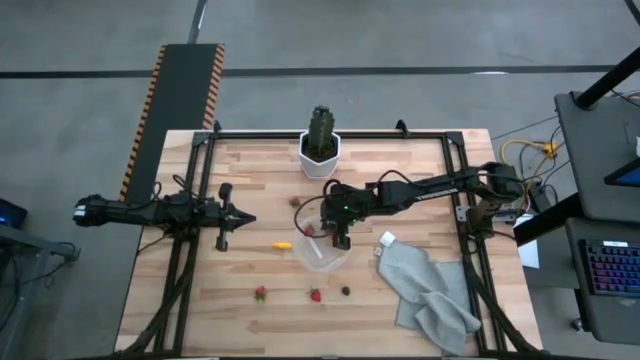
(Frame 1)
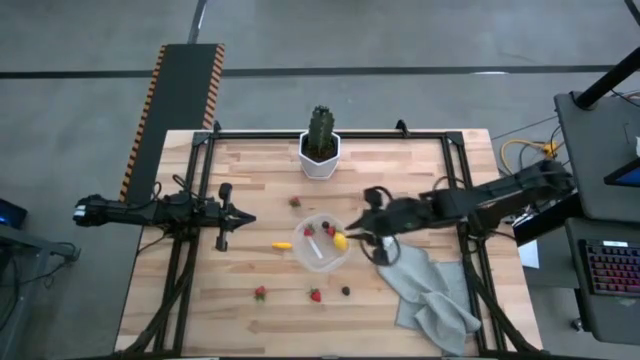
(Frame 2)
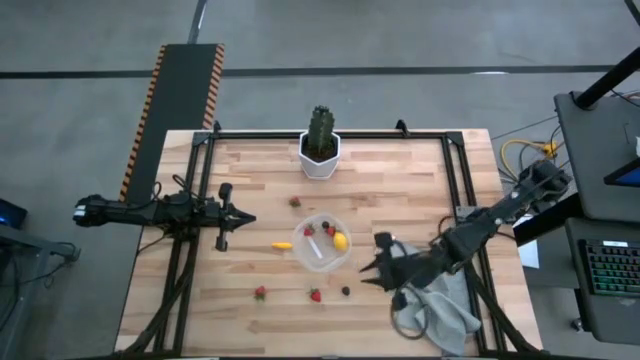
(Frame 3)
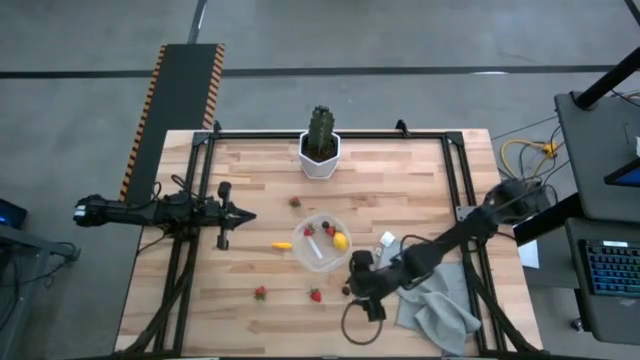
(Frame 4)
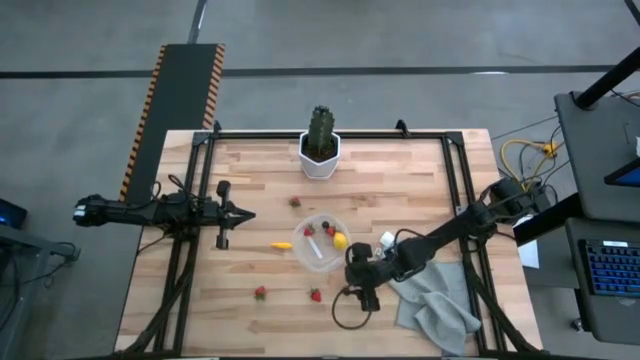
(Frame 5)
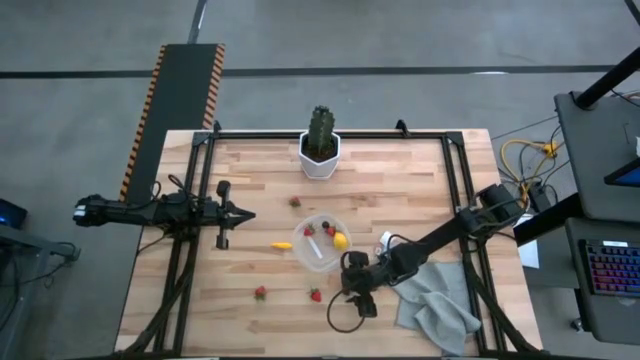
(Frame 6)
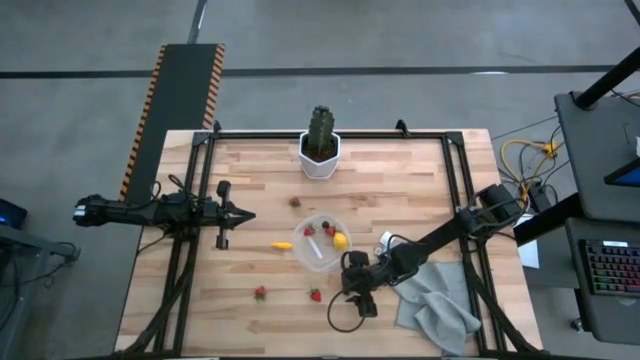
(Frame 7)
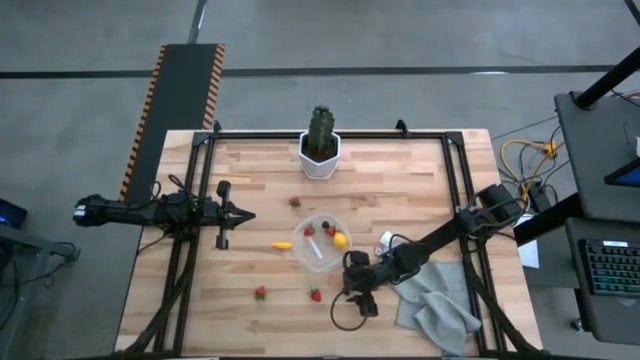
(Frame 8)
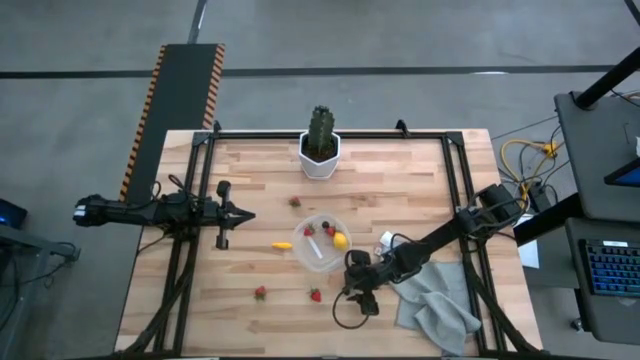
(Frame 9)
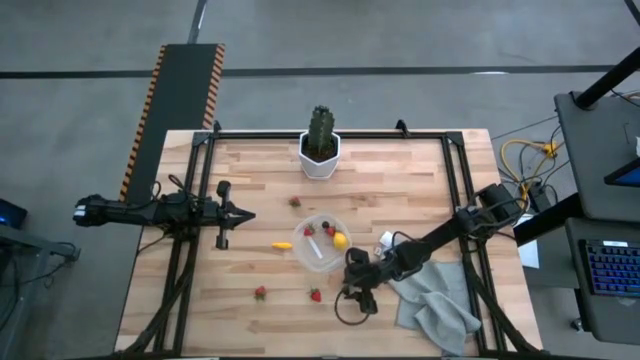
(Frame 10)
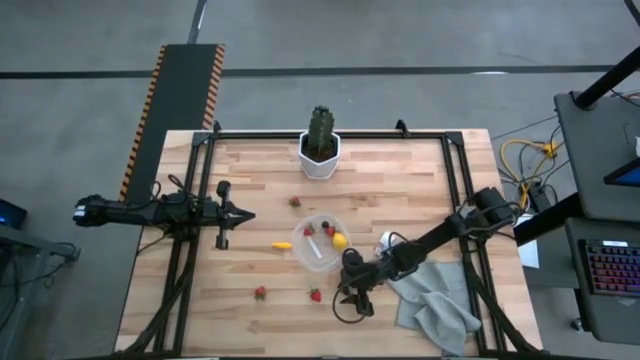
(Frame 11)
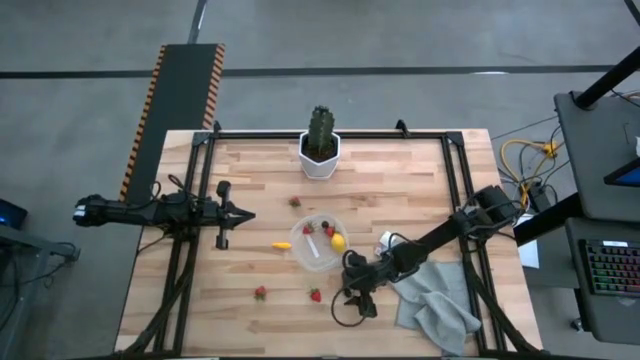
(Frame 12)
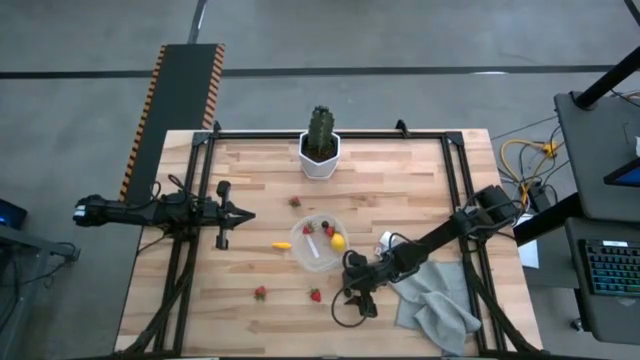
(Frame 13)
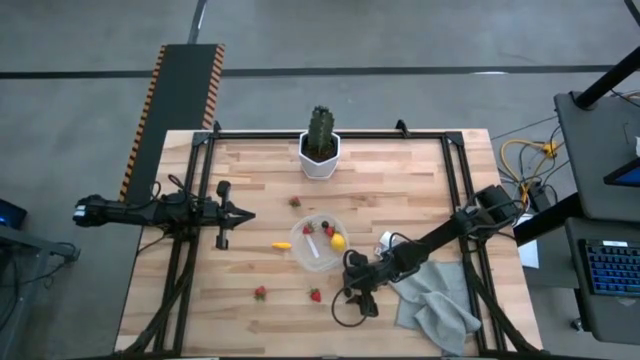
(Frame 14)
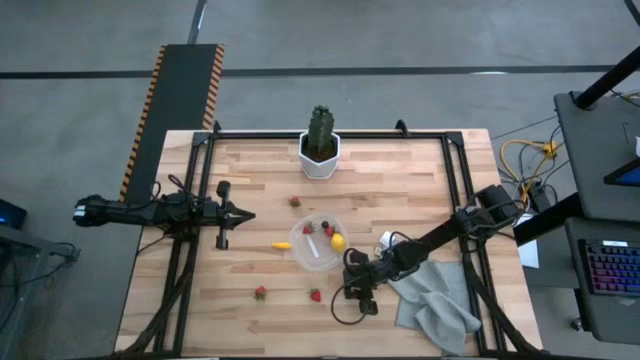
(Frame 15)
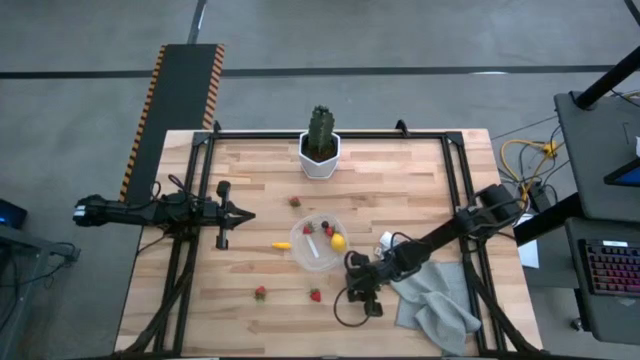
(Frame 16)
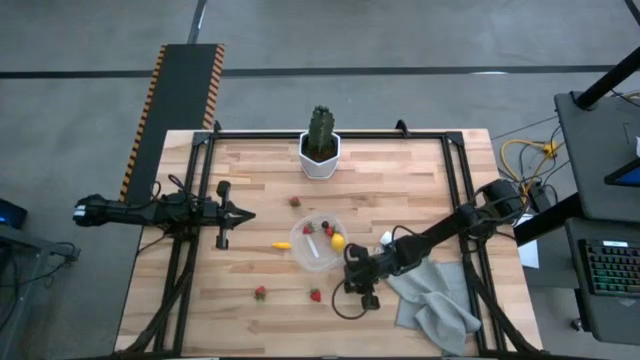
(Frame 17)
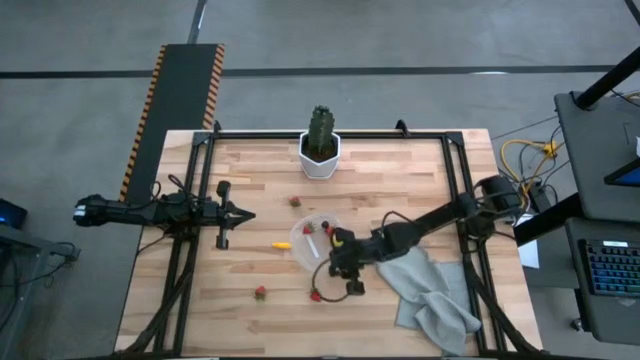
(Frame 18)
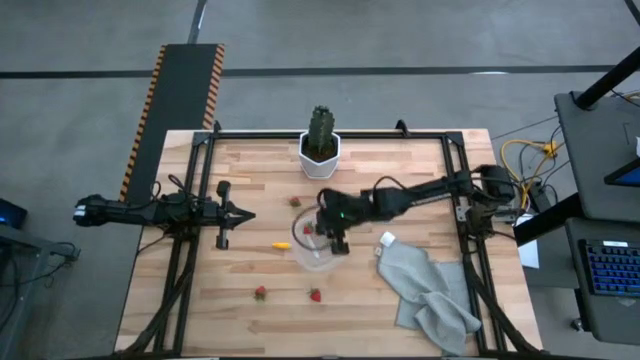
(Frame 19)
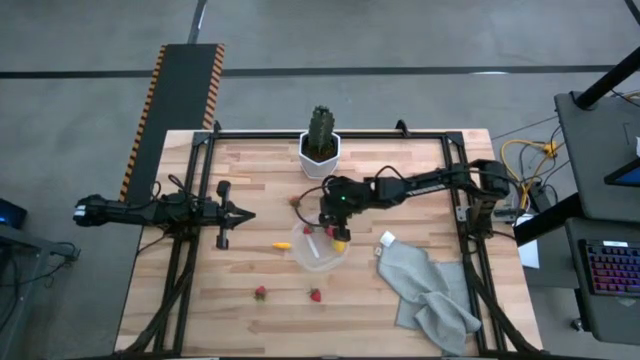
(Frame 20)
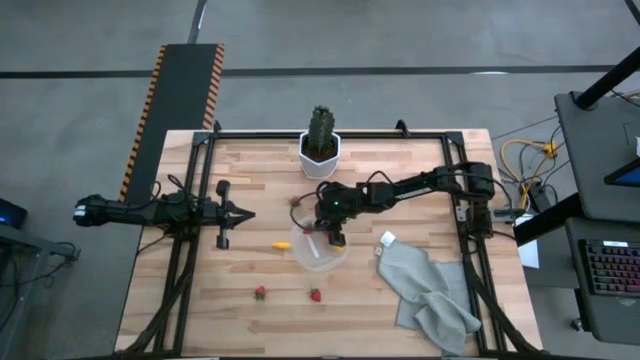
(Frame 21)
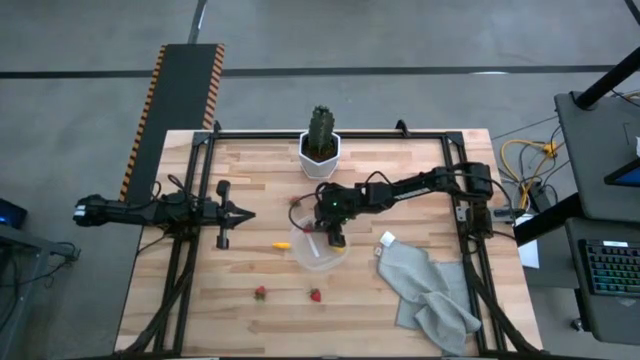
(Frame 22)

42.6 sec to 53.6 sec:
Task: Pick and placing Produce into tupperware
Put the blackberry into the transparent container

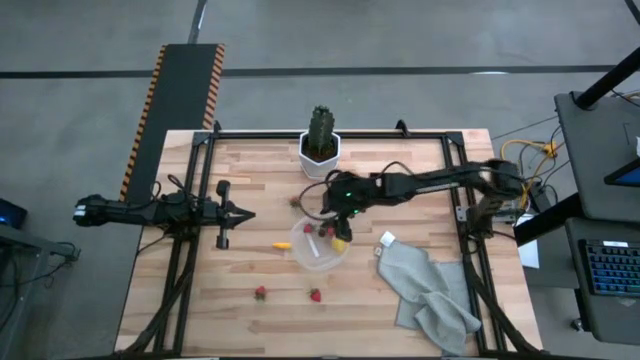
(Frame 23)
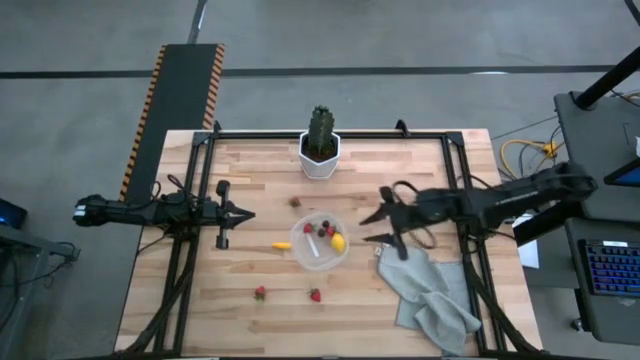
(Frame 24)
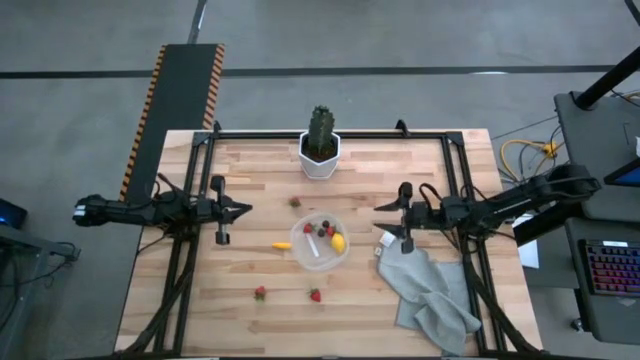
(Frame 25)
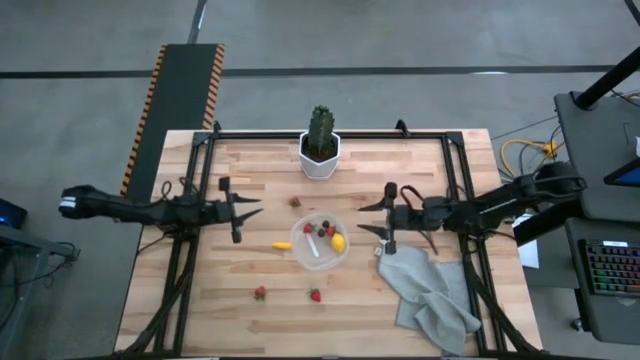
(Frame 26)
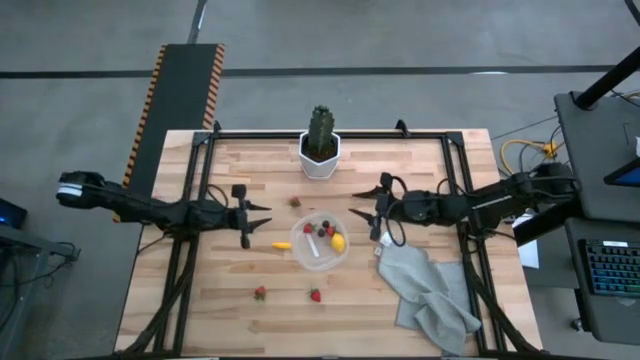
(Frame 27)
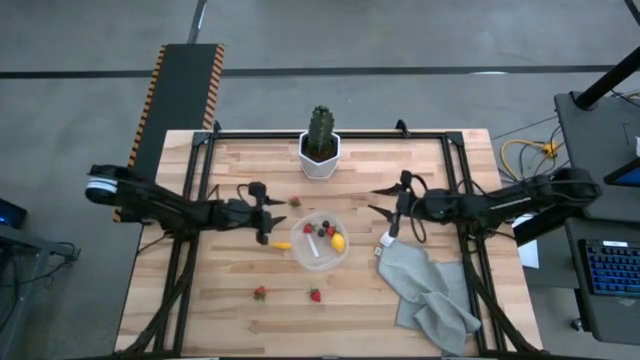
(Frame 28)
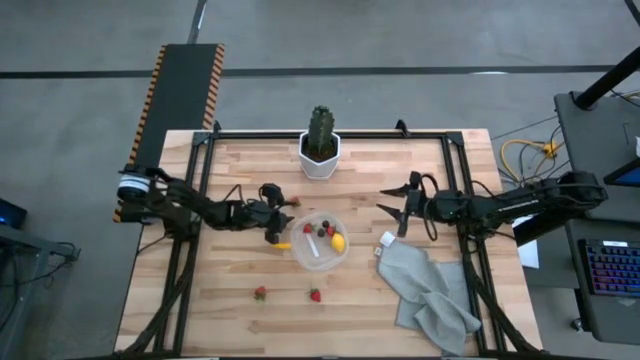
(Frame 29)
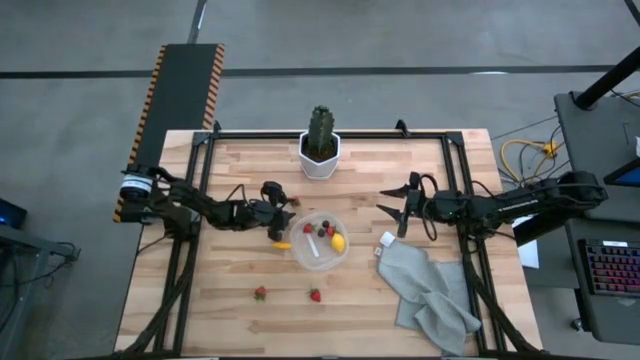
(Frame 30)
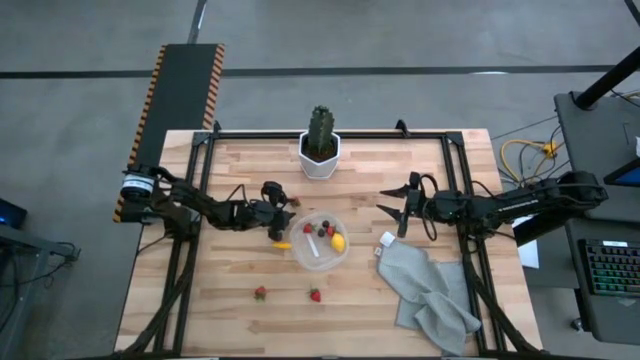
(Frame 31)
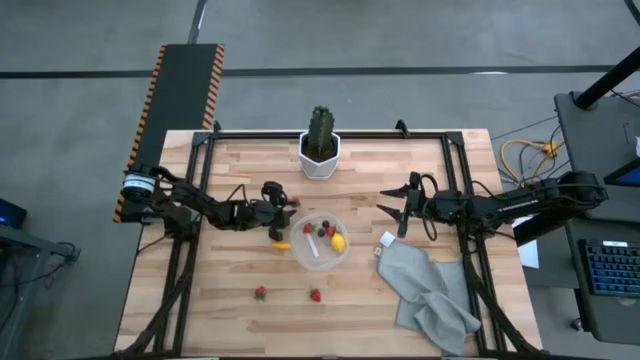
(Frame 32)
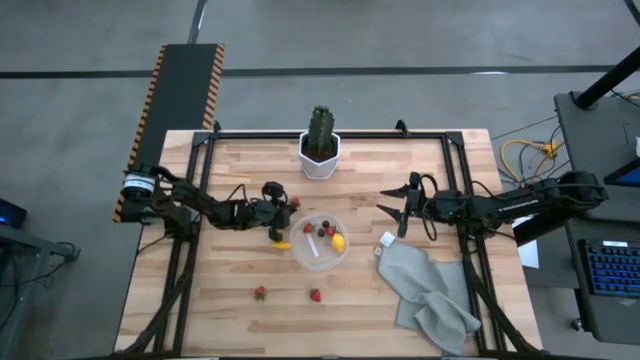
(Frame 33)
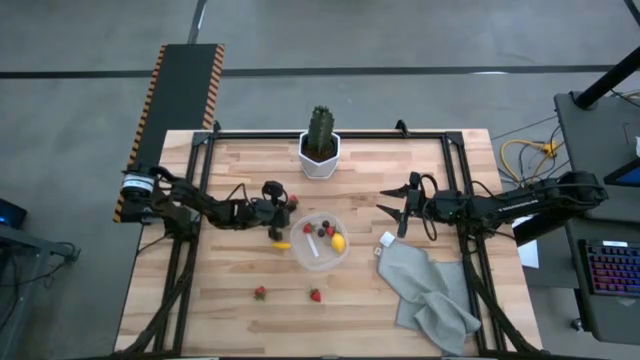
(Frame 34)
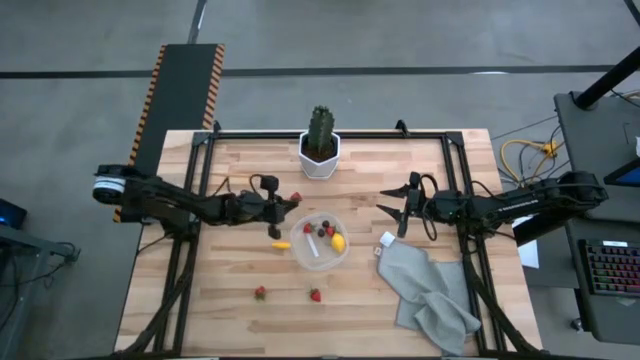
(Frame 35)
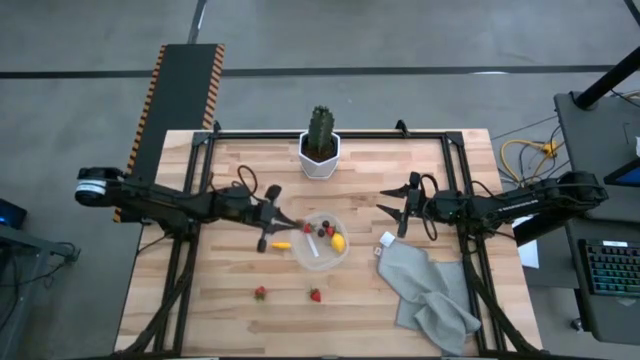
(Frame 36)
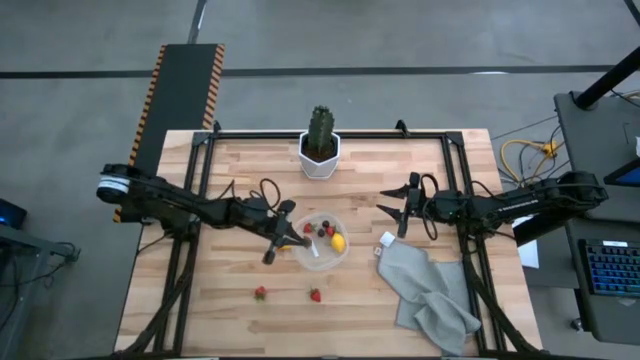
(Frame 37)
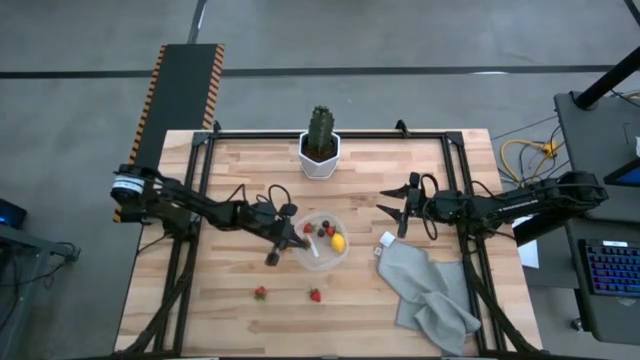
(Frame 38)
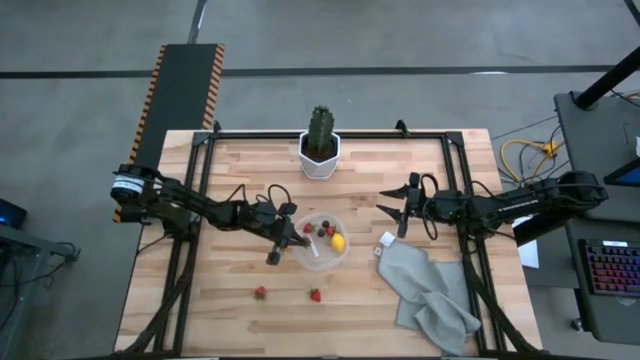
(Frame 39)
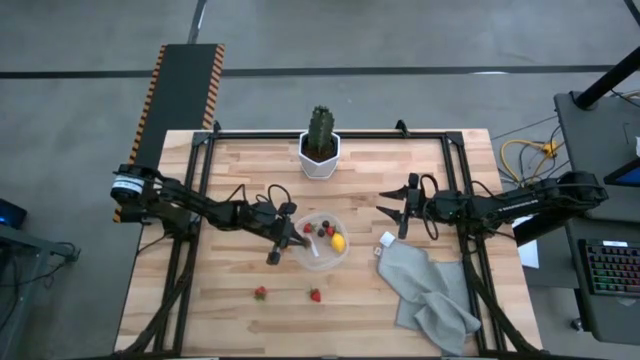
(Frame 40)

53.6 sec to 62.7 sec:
Put the red strawberry into the transparent container

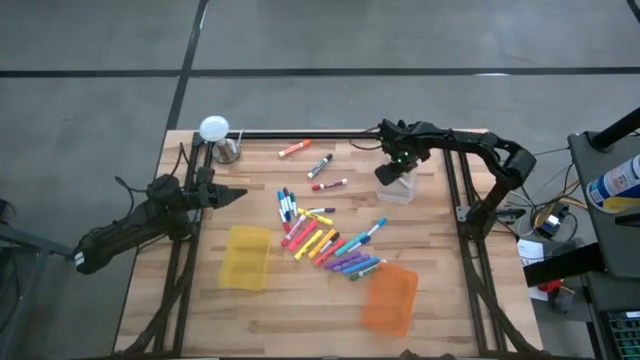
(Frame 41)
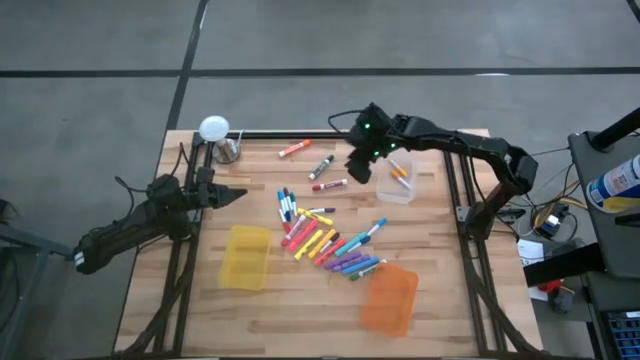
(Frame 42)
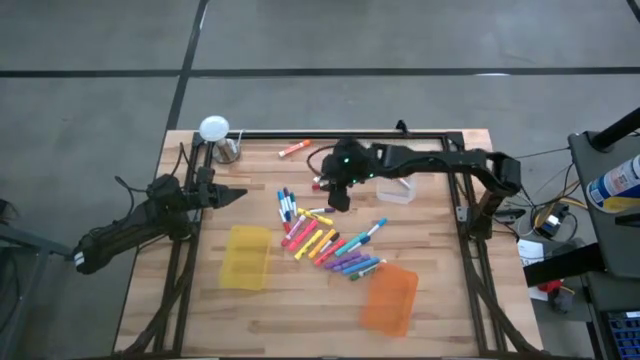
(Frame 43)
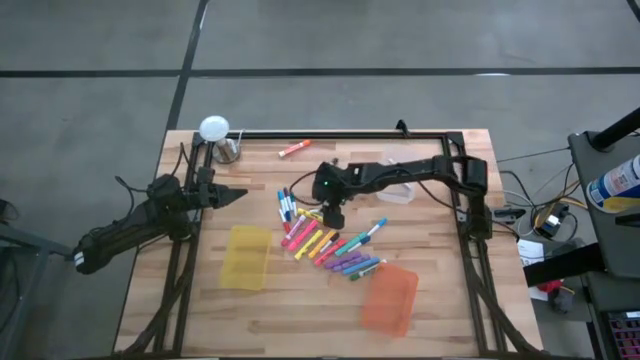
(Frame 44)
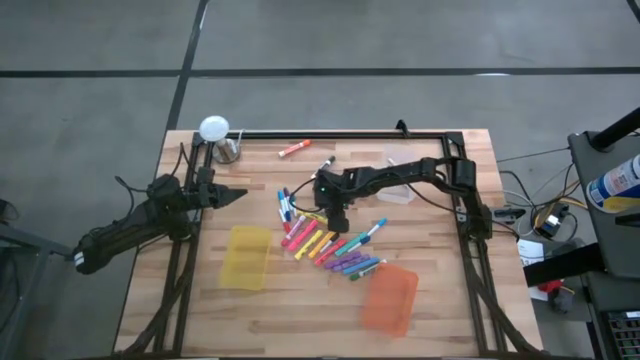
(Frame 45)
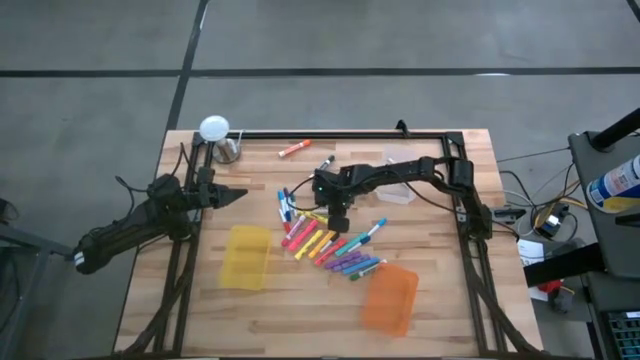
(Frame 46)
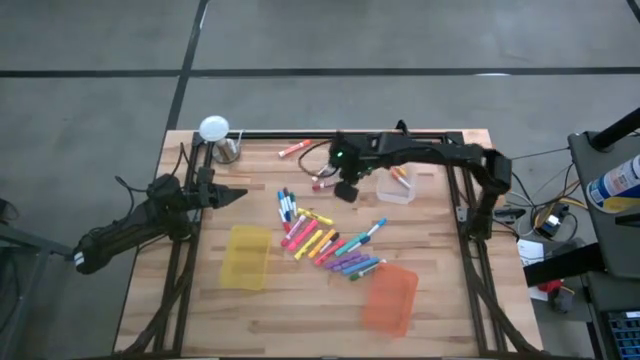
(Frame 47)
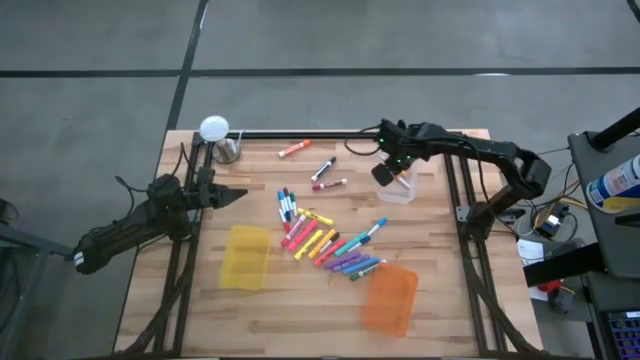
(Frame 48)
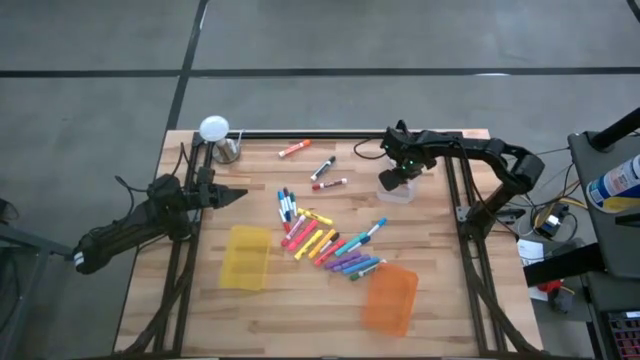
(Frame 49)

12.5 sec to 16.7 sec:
Task: Pick & Place Markers
Put the right small violet highlighter pen into the transparent bin
